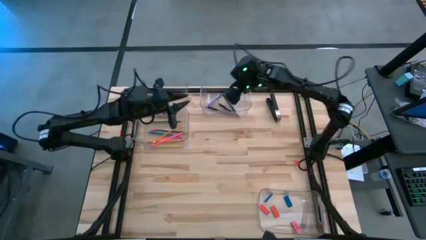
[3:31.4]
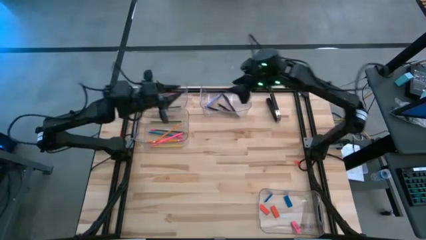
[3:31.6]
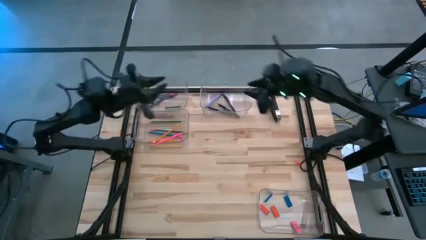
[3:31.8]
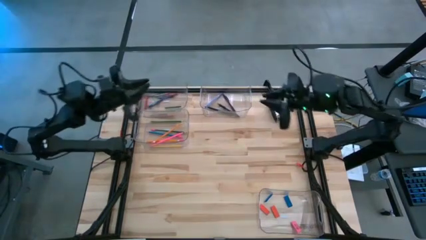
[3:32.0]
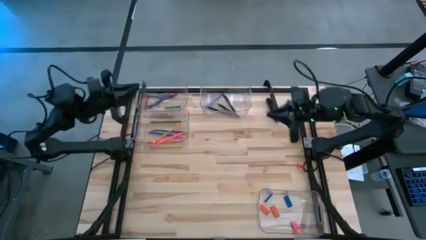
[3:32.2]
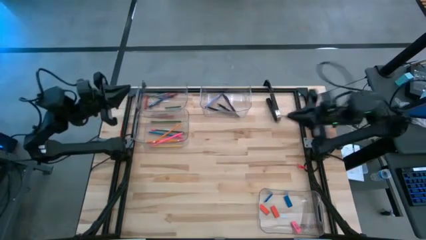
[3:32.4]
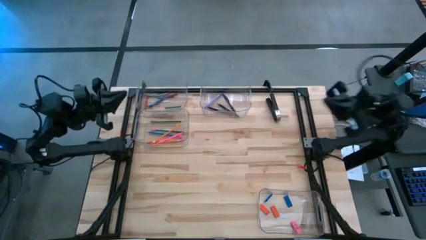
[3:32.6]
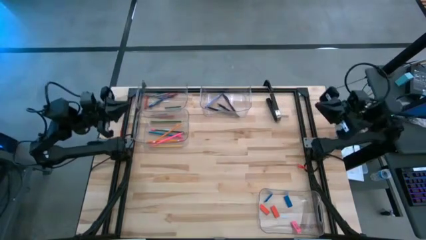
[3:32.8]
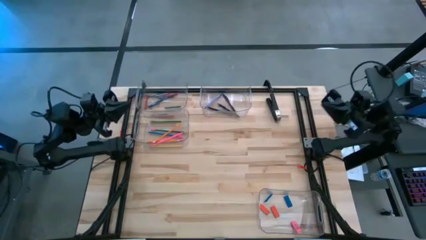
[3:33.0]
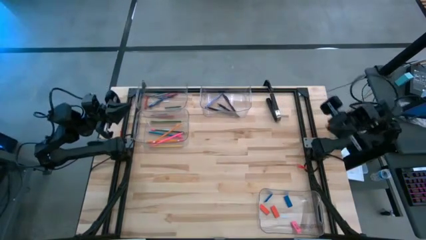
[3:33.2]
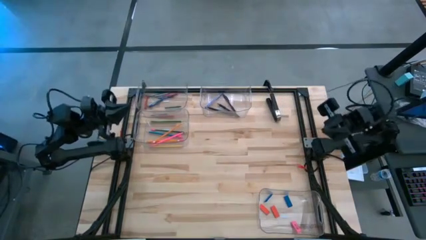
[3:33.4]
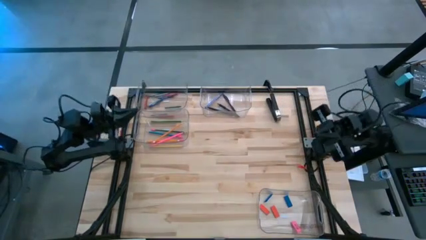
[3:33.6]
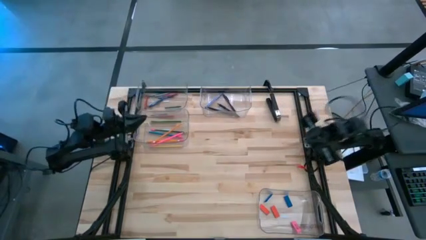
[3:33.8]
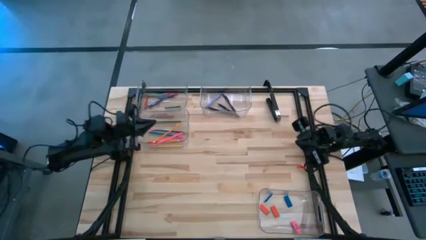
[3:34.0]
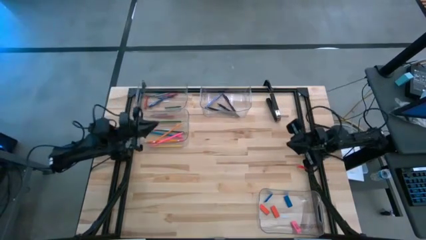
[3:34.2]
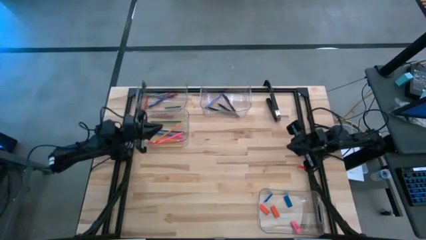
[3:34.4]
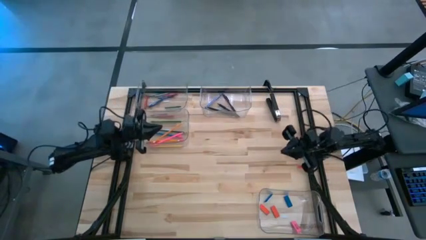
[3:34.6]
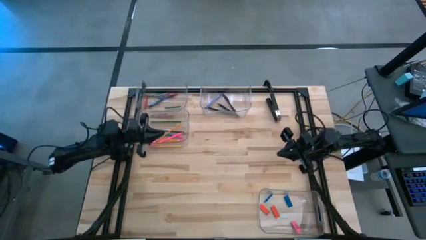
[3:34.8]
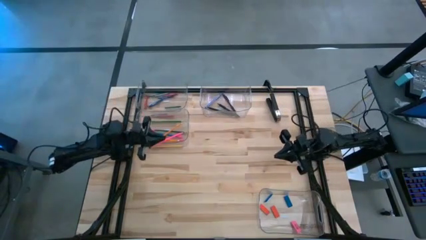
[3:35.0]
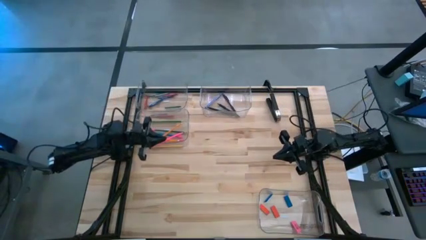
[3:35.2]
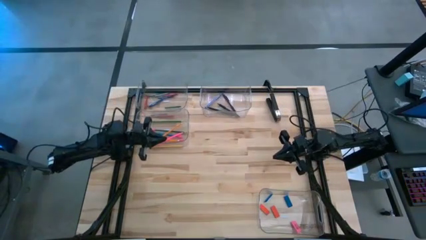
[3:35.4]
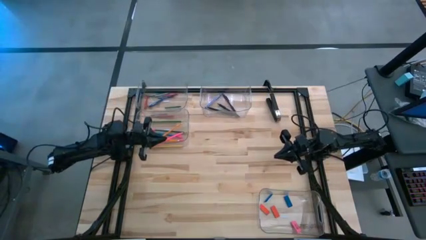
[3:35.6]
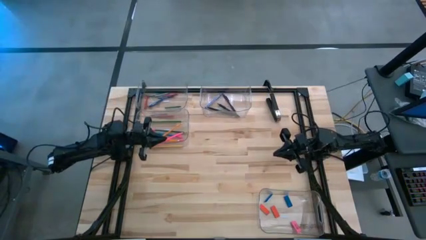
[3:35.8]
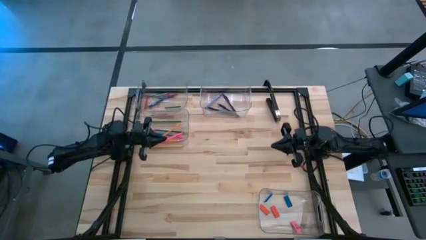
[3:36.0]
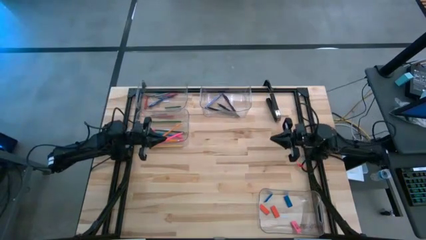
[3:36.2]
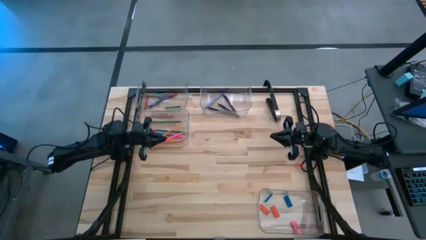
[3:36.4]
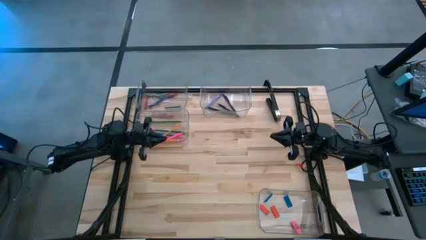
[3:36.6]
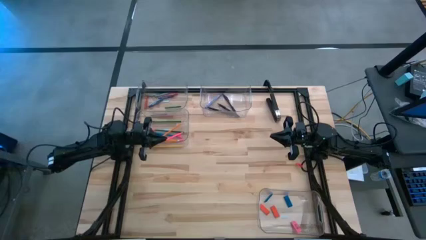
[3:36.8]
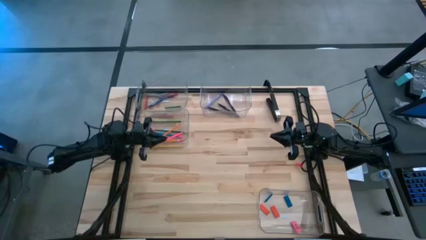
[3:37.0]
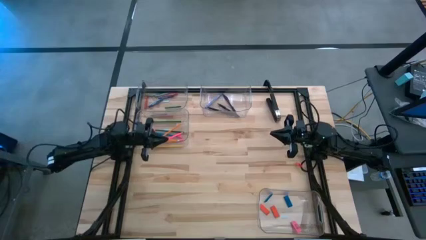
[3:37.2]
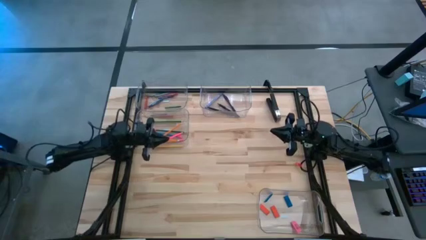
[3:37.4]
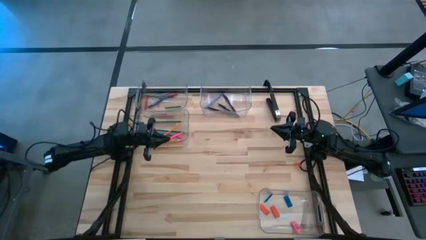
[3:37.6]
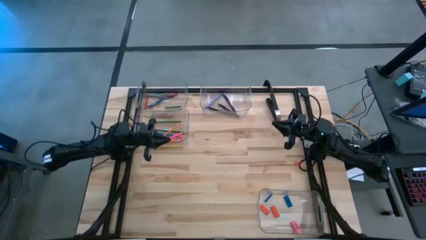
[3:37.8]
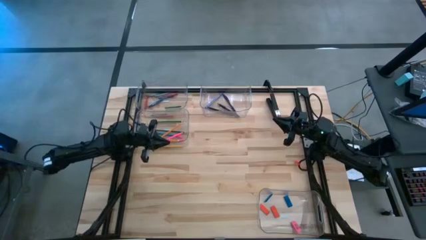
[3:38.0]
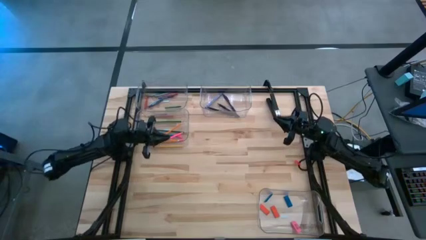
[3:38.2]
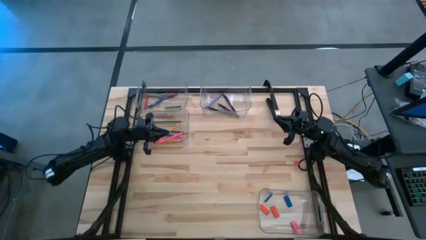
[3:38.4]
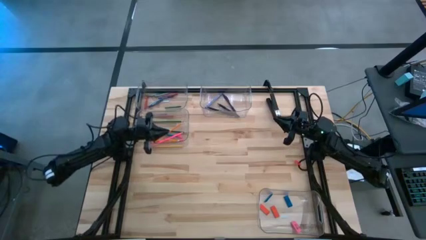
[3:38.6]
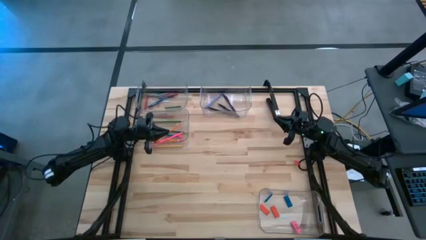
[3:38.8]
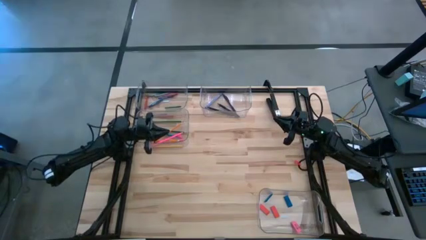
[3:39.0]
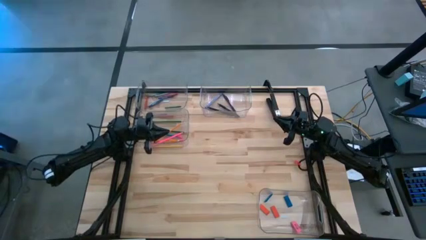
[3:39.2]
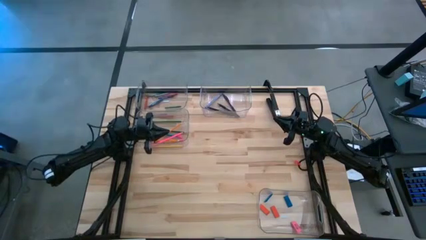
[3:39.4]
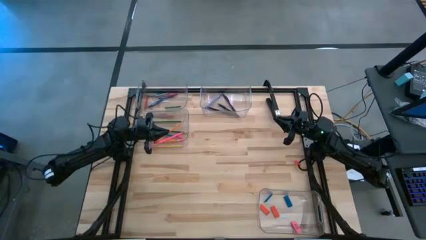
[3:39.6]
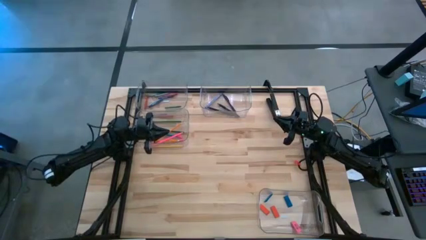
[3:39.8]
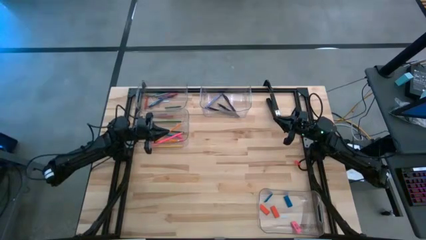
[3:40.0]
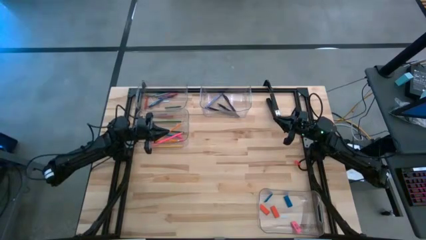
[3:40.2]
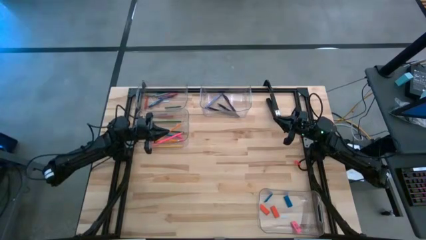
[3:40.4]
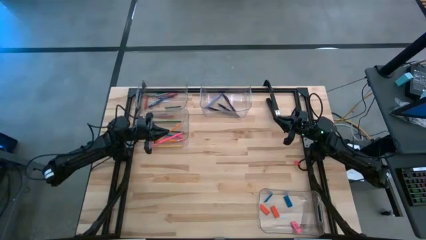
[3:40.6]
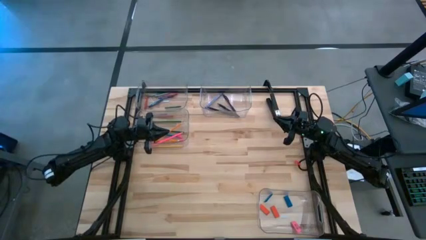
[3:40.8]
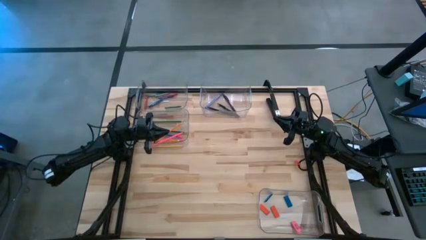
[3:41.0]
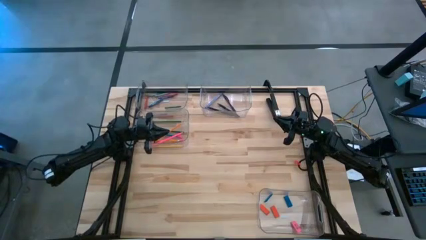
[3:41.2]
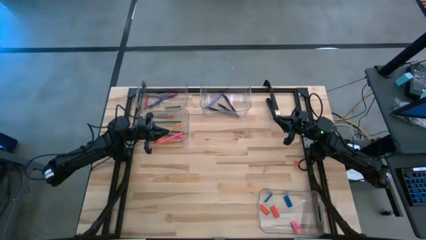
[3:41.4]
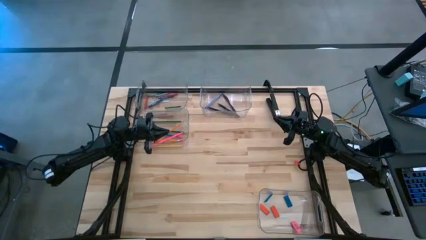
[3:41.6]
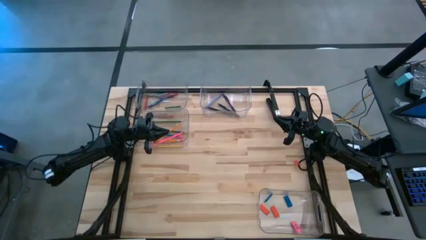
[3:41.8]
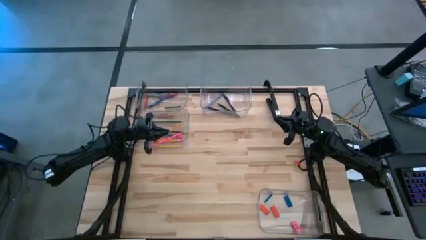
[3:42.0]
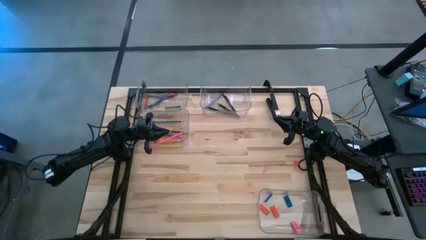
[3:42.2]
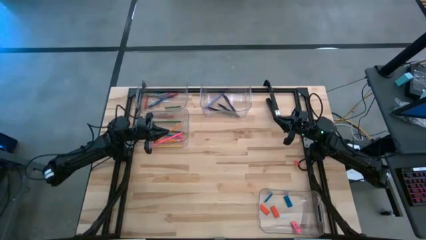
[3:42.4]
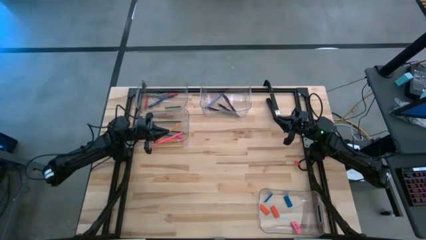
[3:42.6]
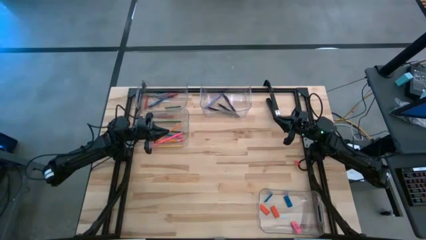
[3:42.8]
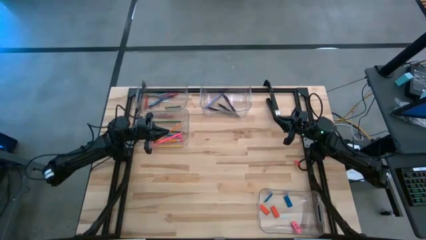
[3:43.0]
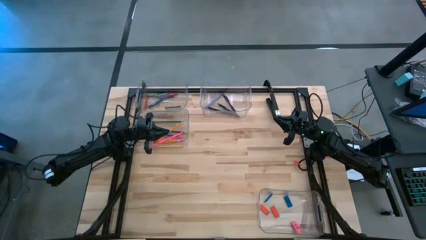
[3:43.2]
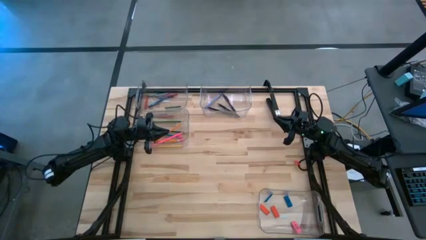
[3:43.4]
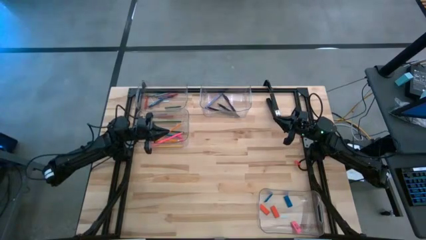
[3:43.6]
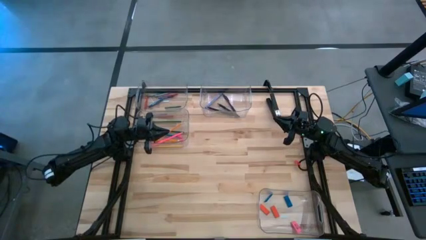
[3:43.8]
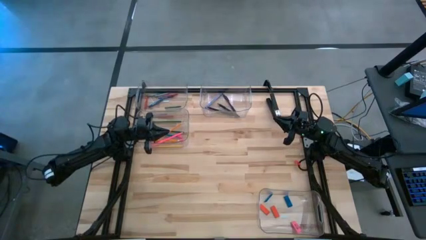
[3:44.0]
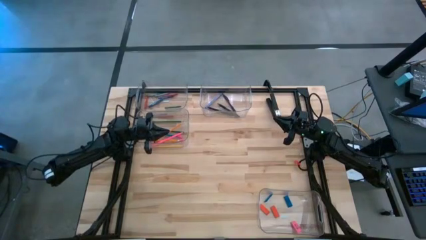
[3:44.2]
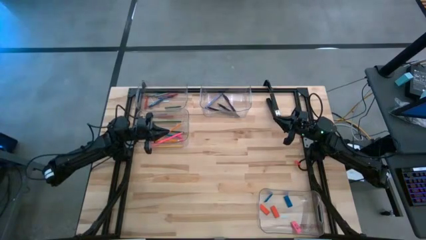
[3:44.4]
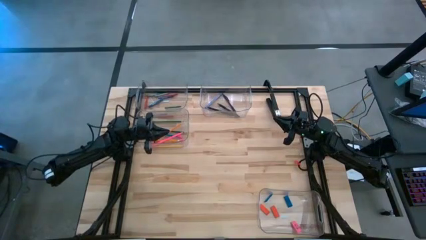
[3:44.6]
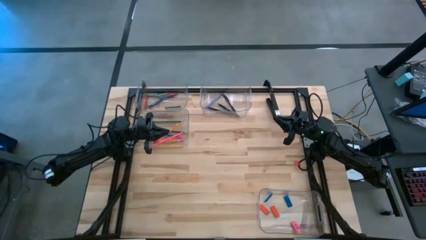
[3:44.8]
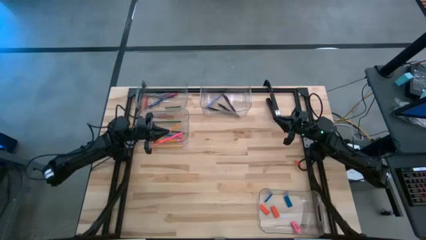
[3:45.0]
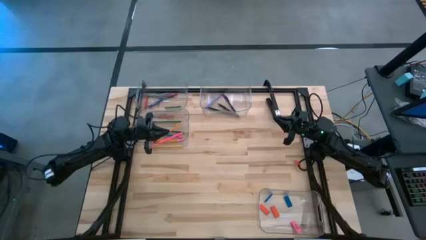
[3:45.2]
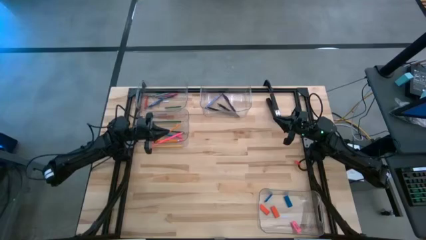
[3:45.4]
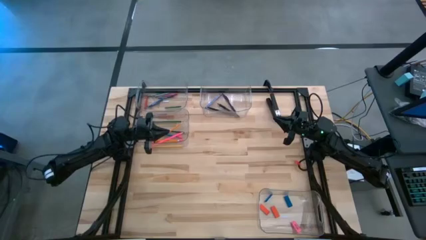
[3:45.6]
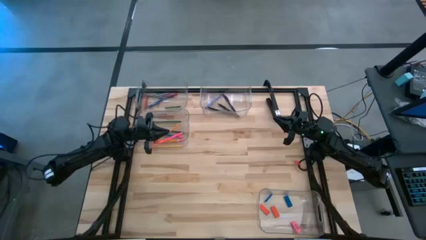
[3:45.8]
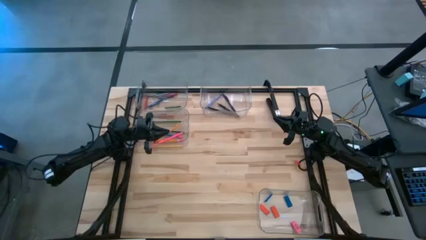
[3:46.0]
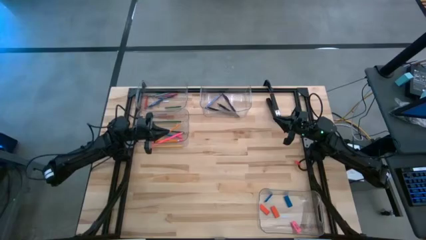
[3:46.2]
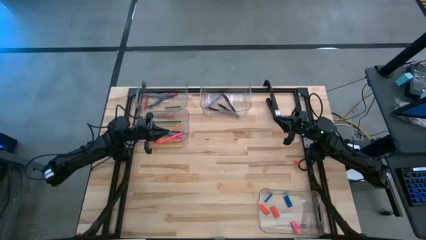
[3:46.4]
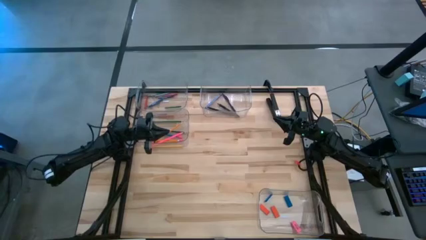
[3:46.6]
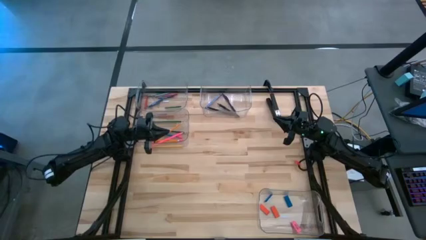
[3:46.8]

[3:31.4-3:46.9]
Task: Sort crayons/erasers/pens/pencils in bins
Return to Home Position

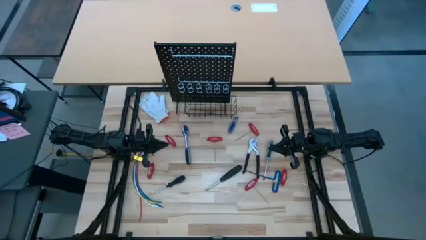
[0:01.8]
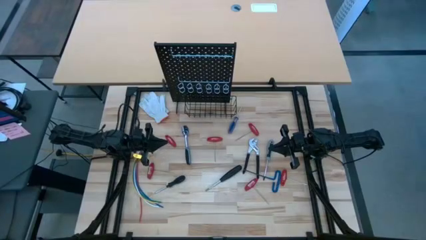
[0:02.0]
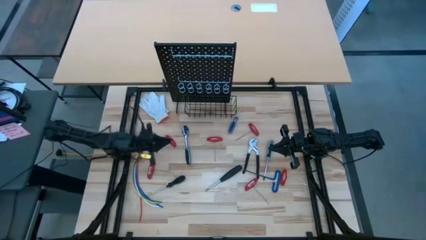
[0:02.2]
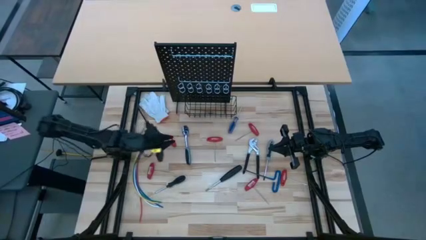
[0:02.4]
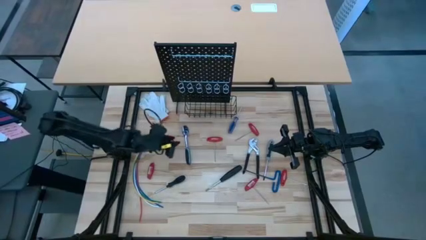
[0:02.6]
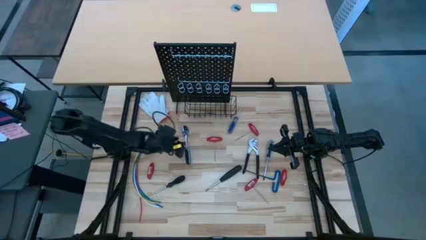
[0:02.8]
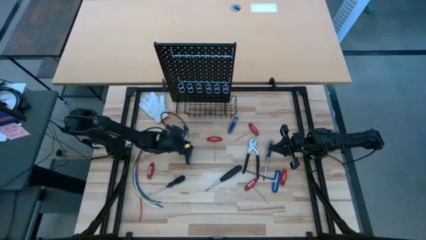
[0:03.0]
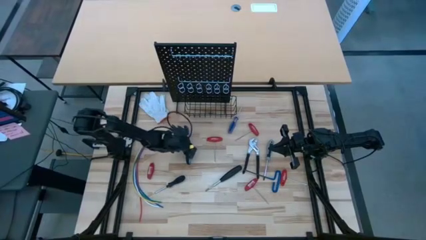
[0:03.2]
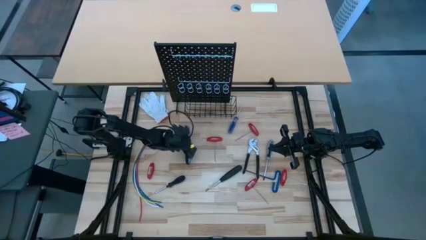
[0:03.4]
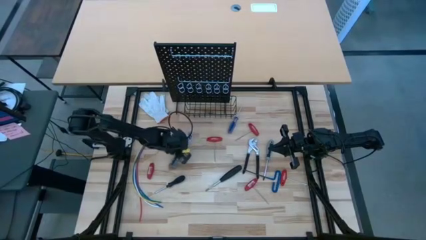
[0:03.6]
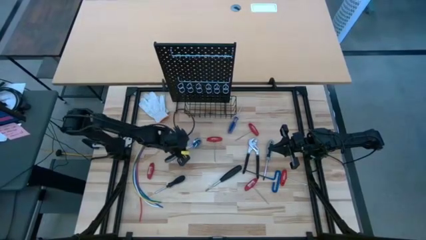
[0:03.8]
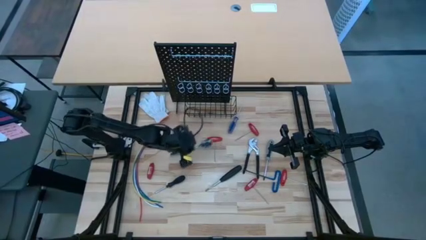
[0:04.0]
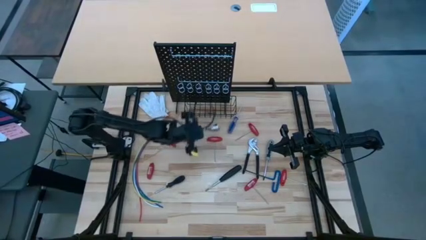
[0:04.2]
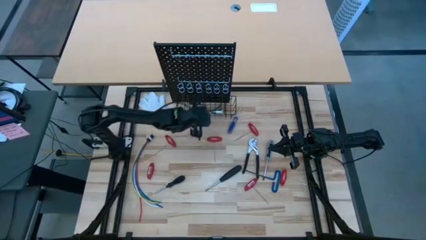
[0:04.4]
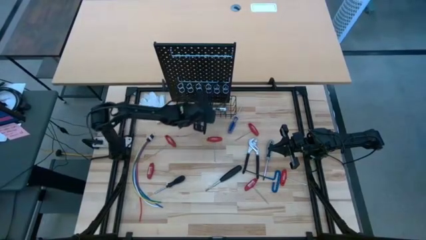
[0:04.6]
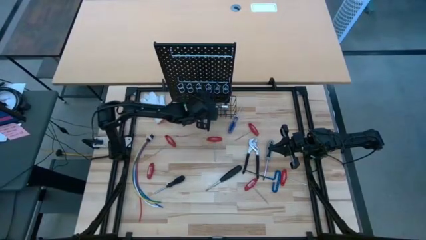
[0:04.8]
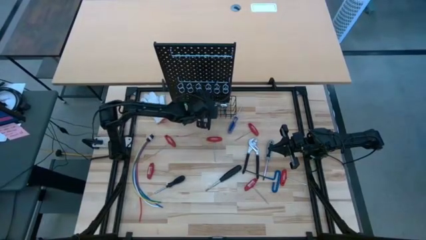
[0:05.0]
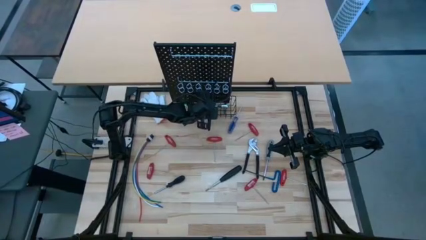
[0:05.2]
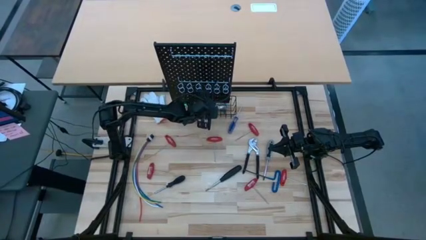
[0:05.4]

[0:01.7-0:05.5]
Task: Hang tools onto peg board
Put the gray ratchet wrench into the black wire basket on the black pegboard
